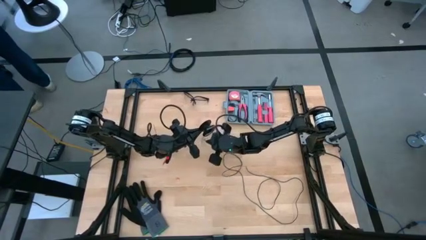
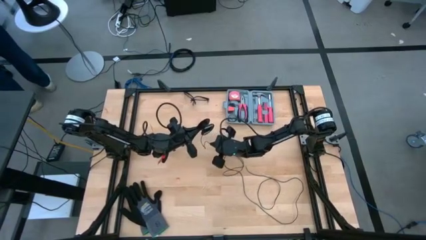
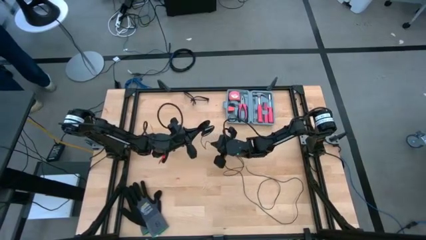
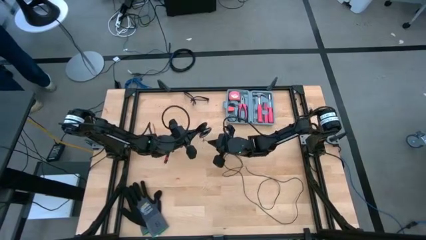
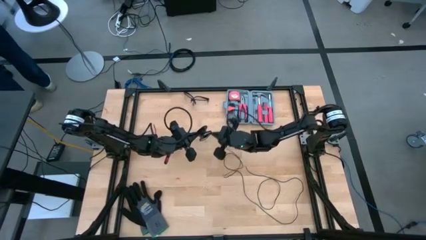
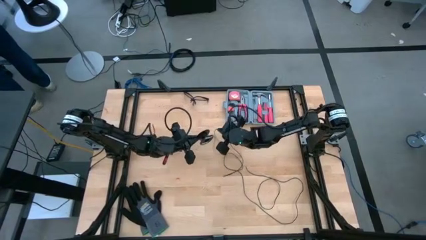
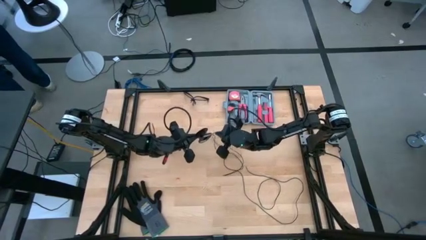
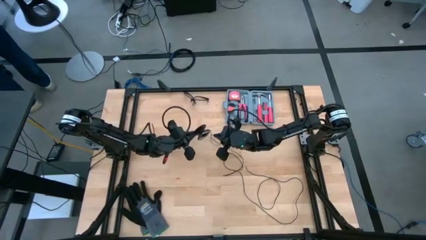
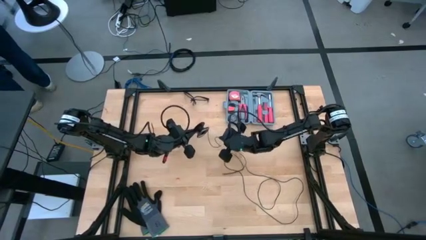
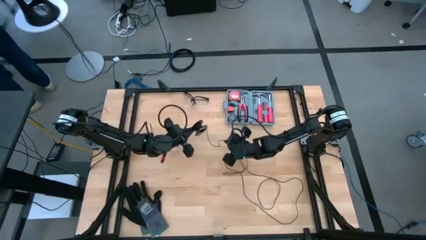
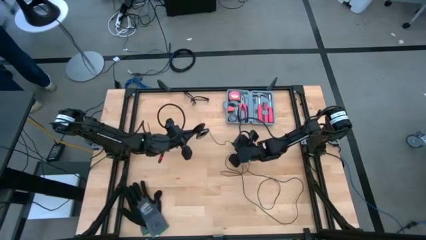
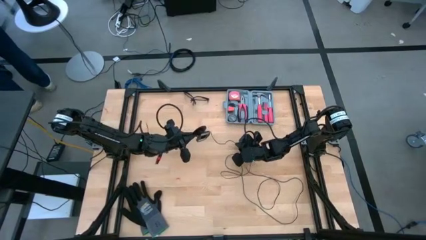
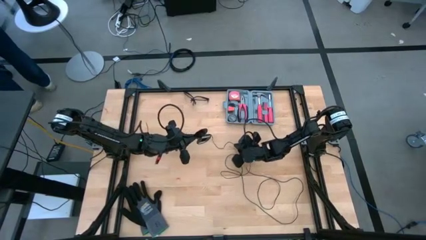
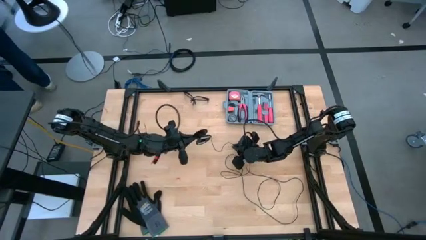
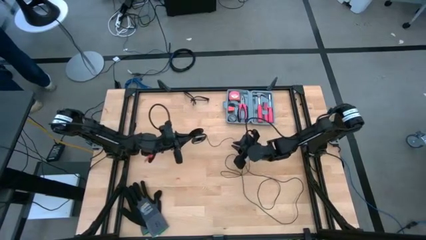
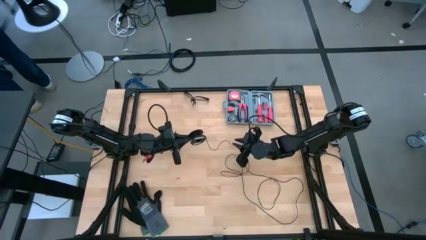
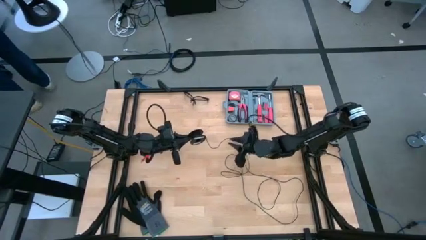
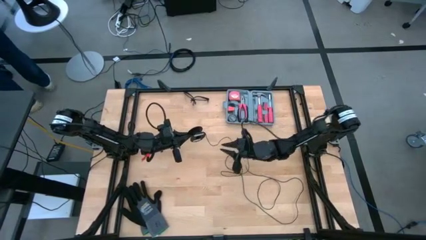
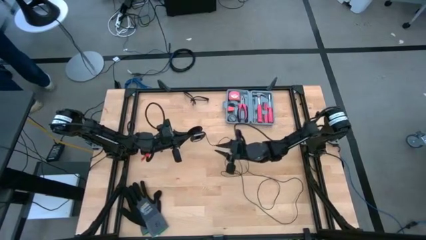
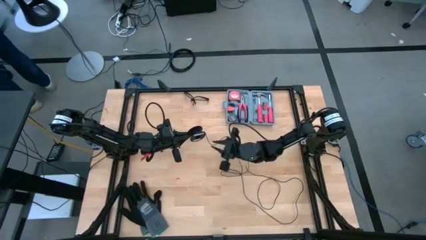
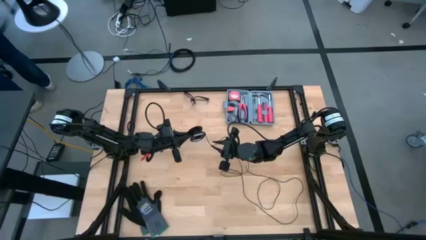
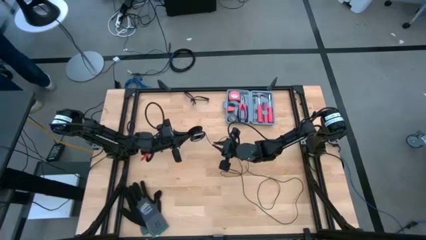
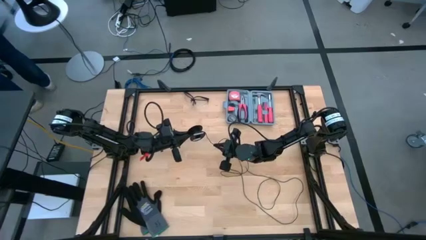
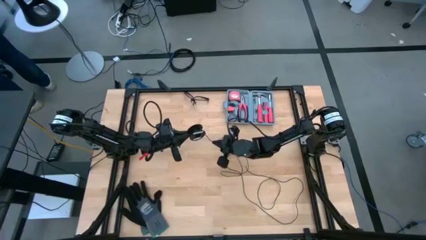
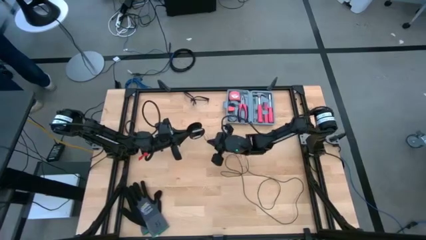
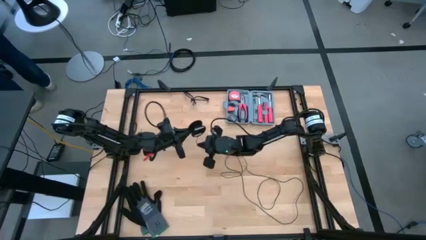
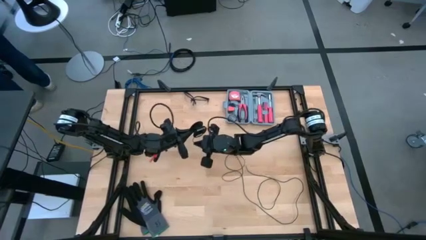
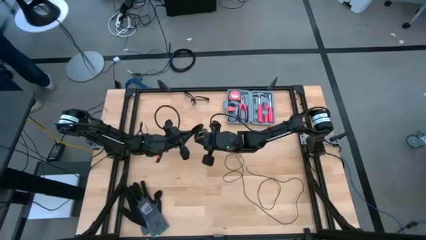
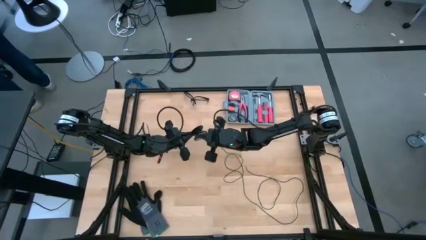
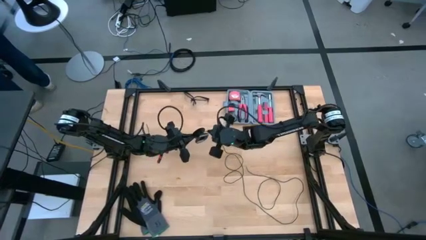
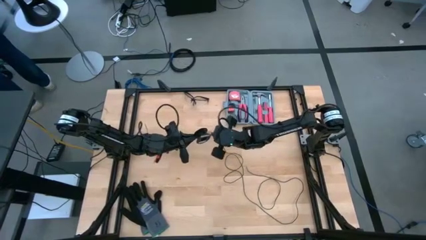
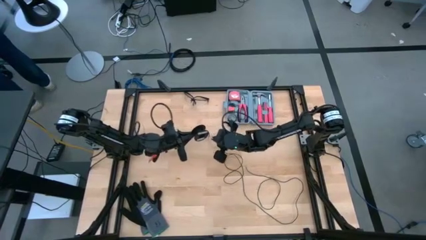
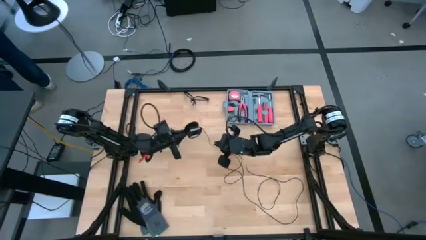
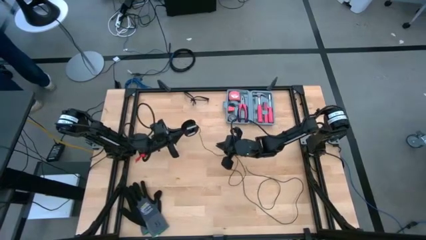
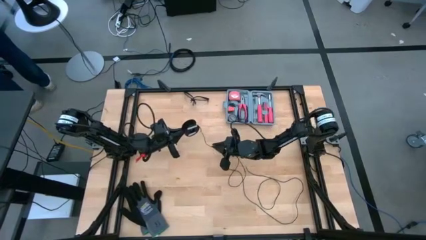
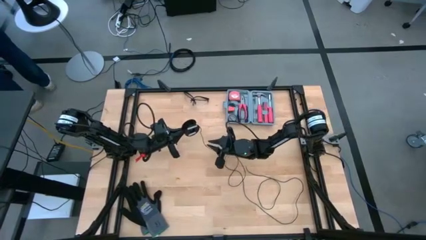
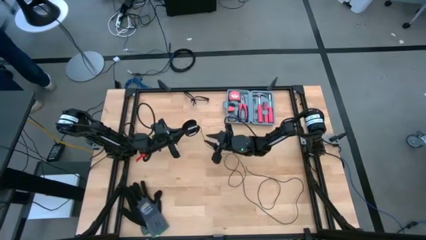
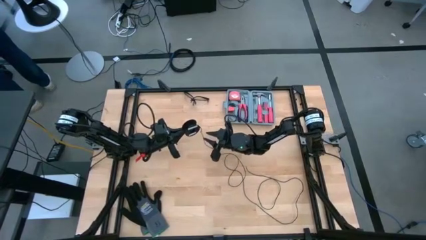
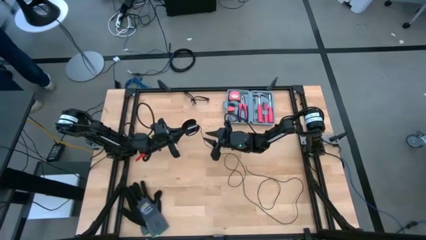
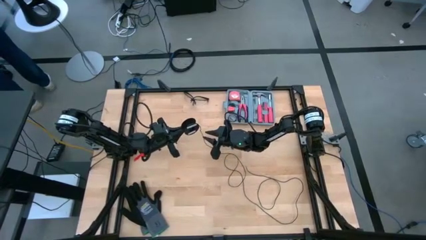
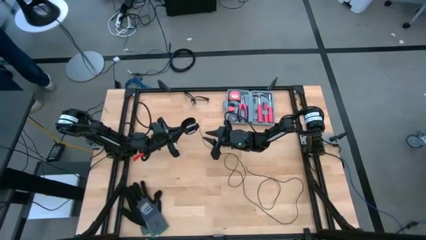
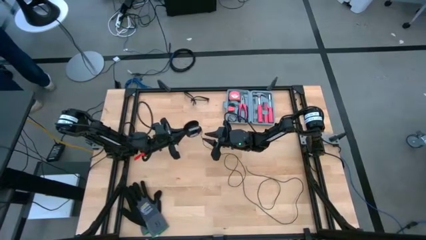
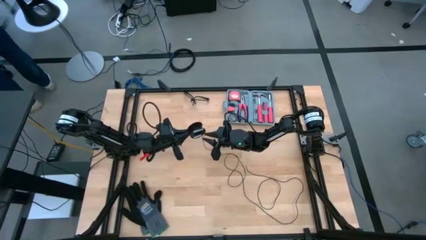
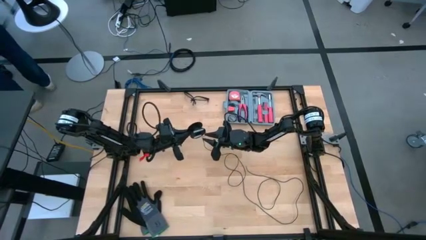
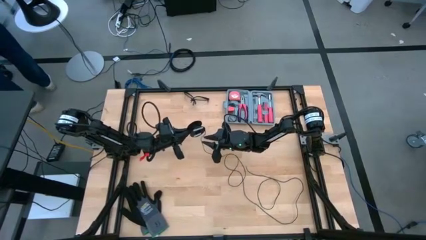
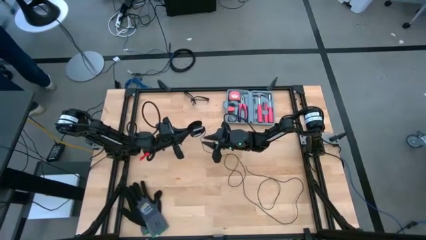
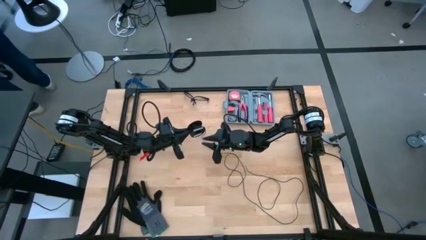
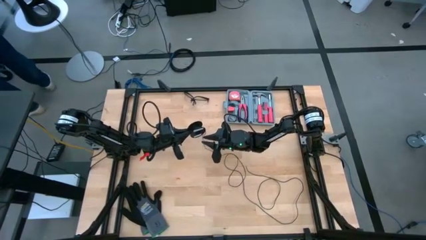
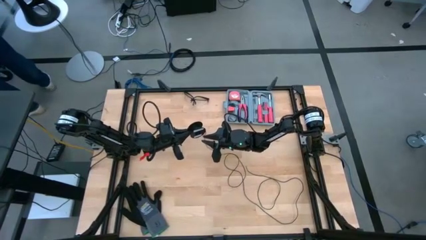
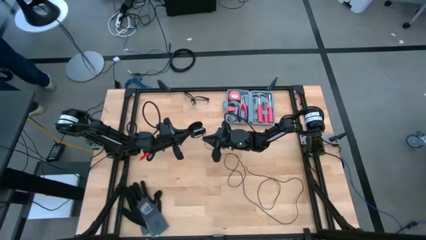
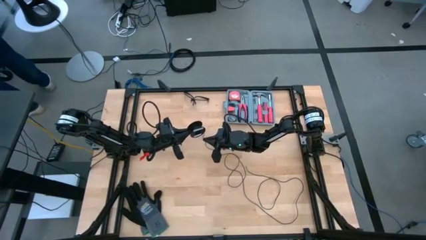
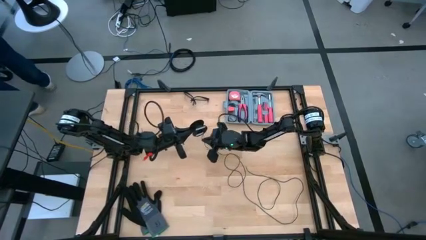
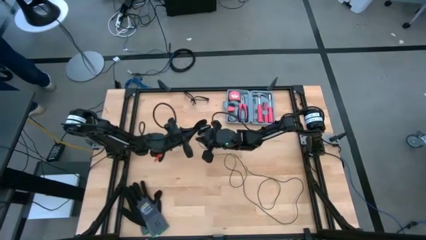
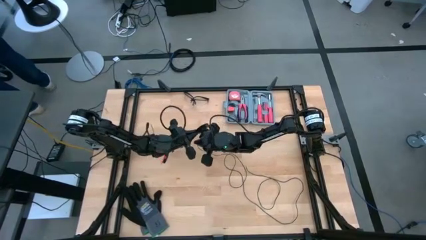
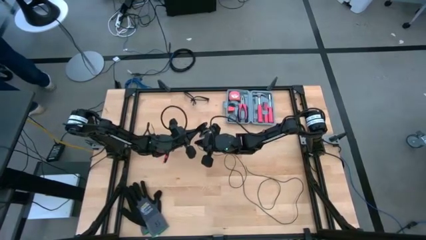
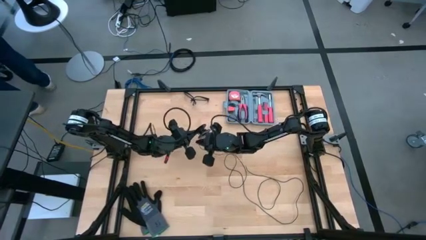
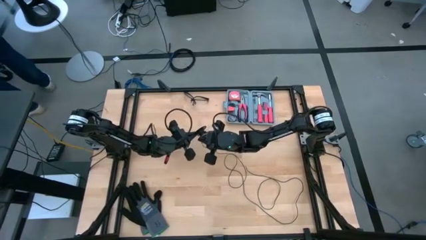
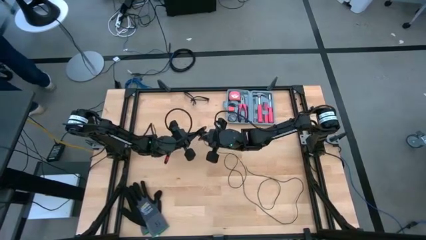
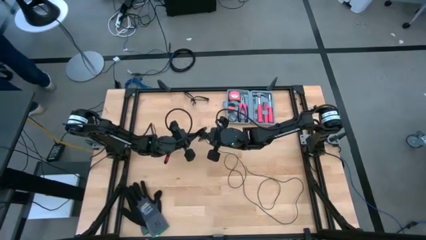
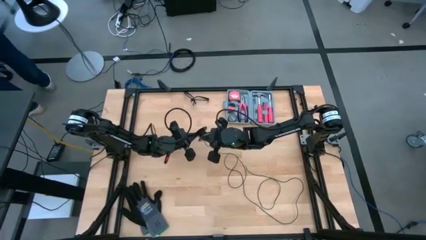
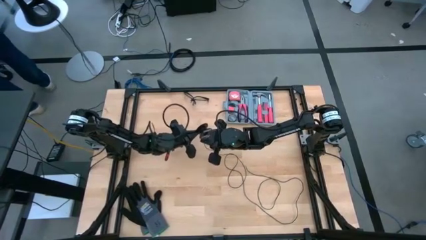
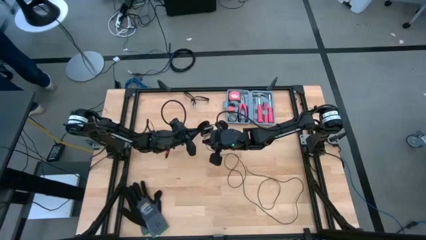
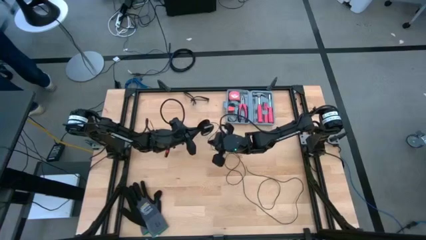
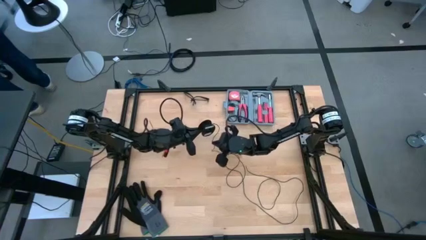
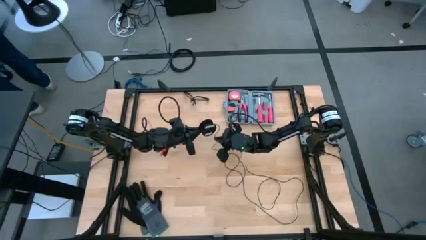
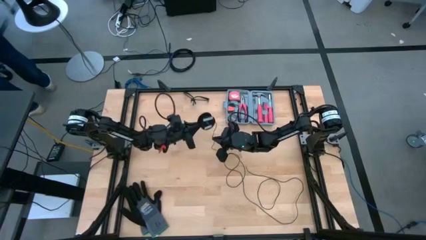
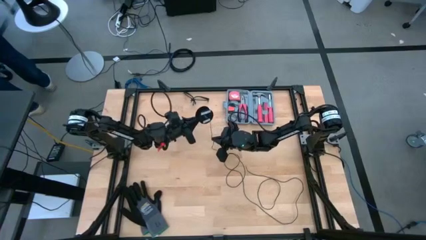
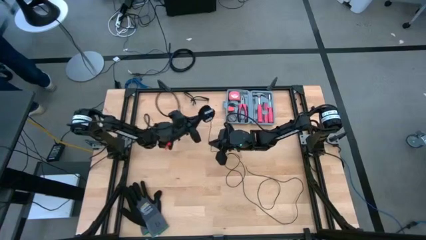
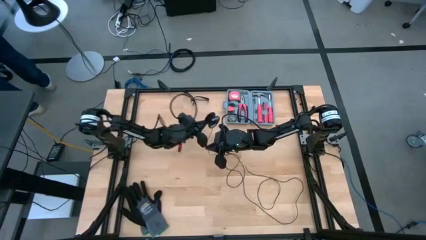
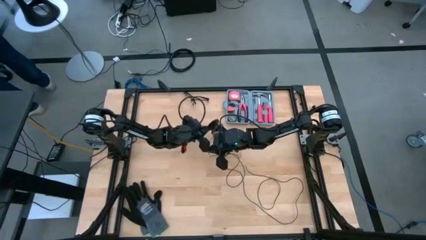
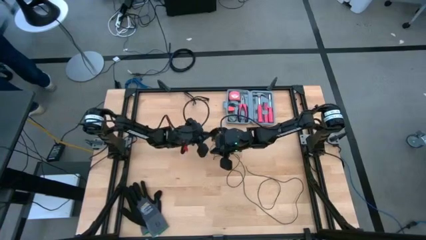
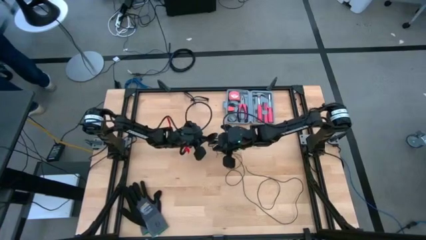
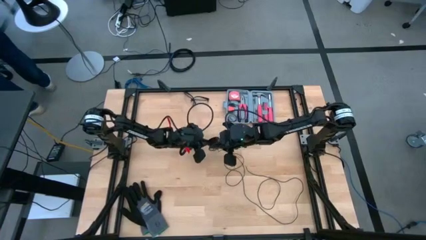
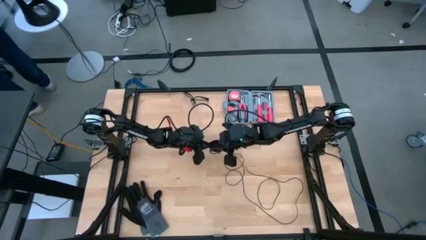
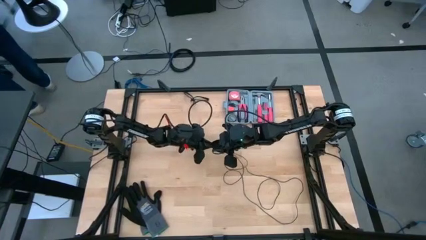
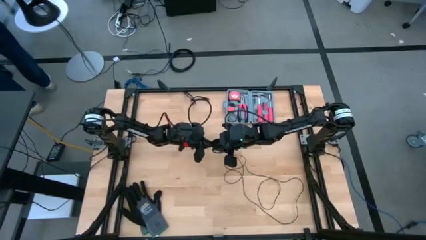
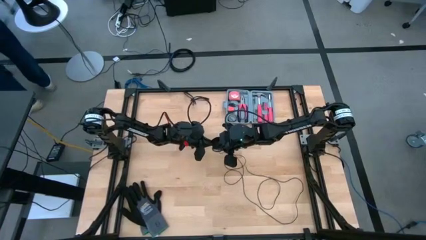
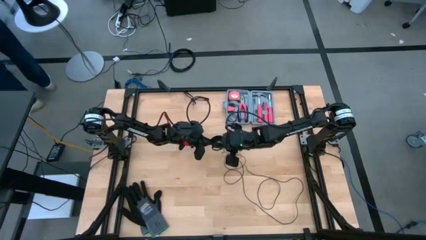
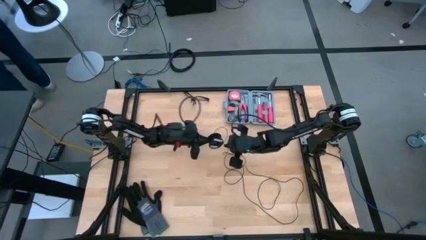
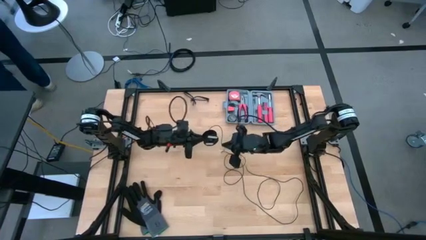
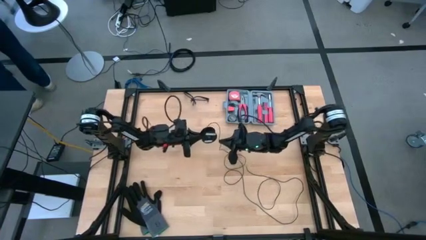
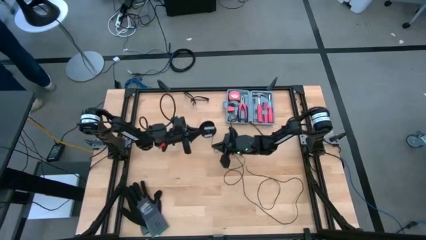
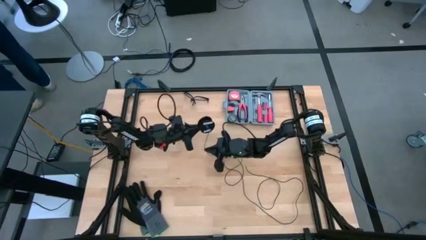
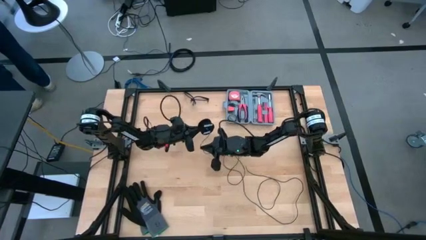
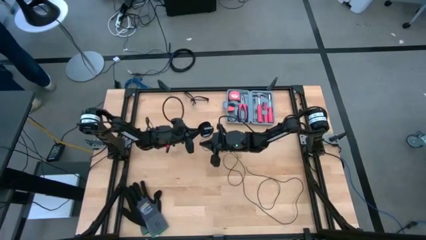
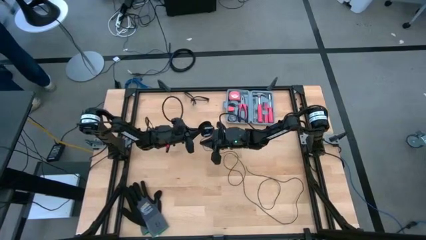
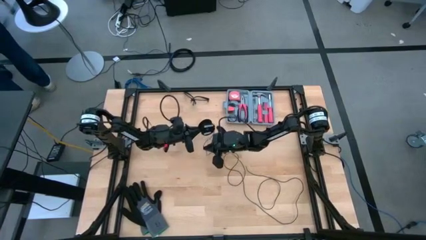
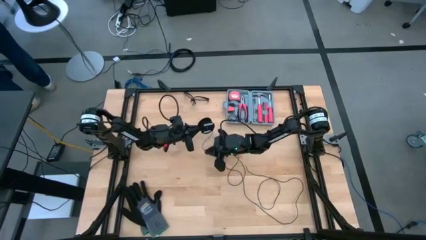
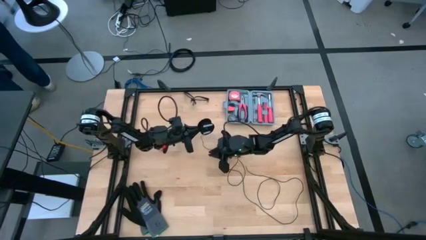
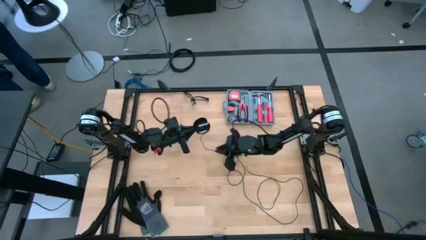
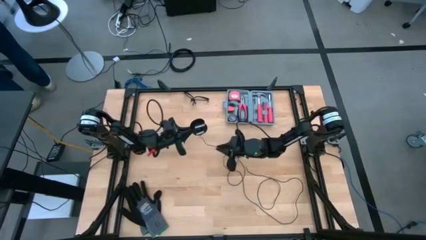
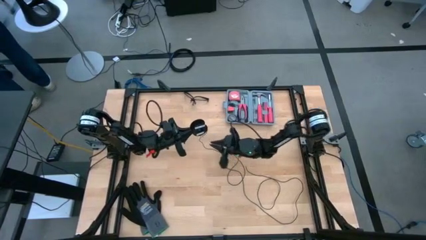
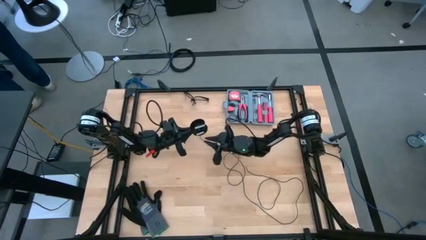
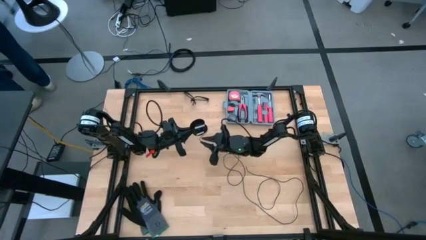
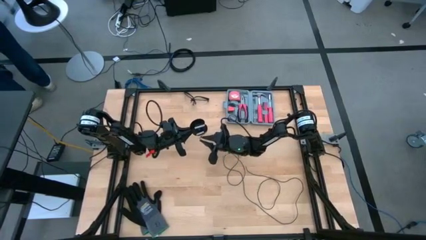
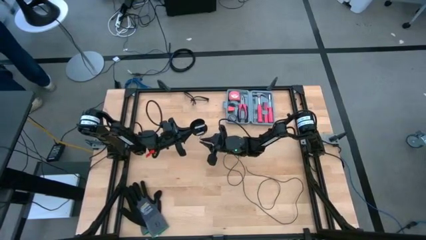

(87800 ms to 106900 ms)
Task: Coil cords
Coil the black wire onto the spool
